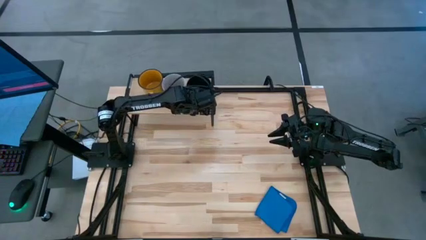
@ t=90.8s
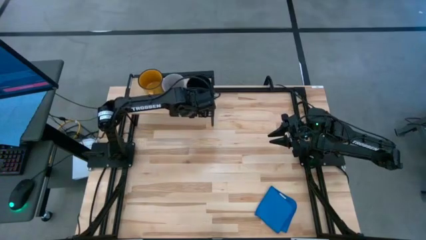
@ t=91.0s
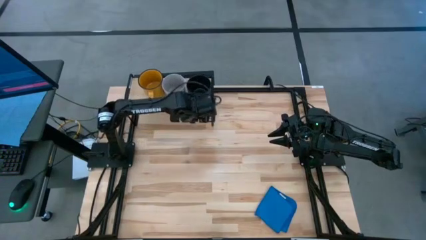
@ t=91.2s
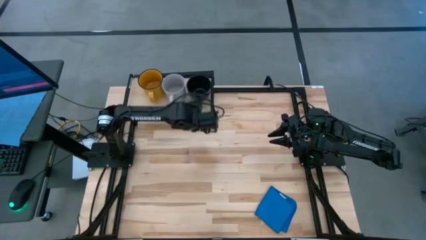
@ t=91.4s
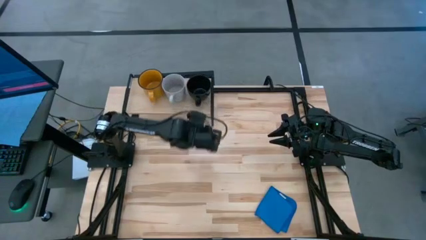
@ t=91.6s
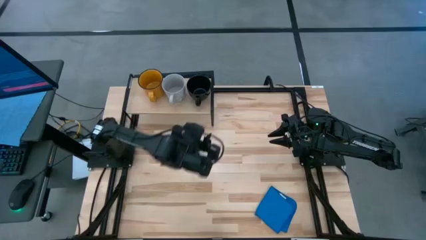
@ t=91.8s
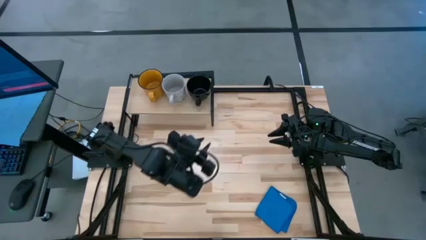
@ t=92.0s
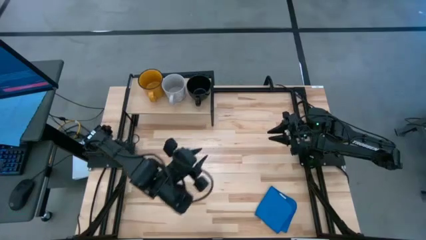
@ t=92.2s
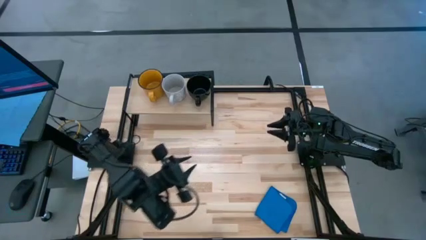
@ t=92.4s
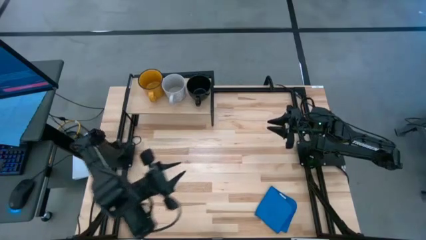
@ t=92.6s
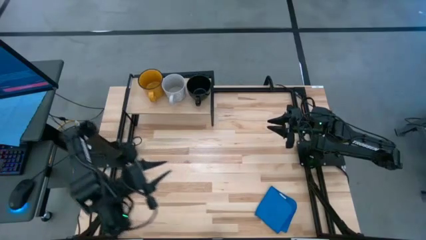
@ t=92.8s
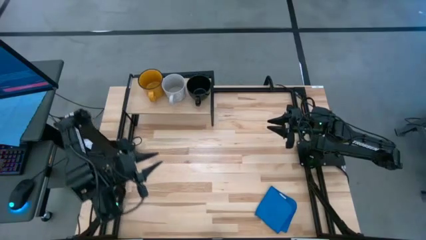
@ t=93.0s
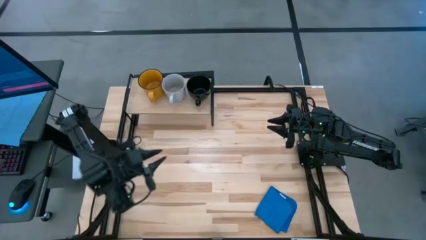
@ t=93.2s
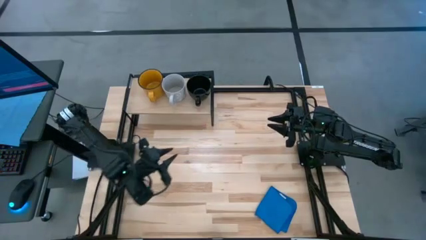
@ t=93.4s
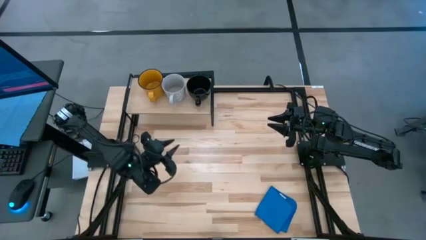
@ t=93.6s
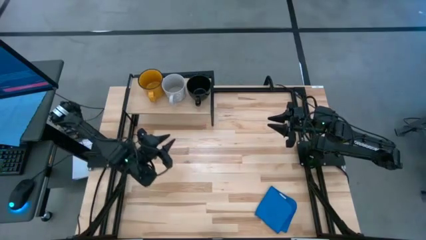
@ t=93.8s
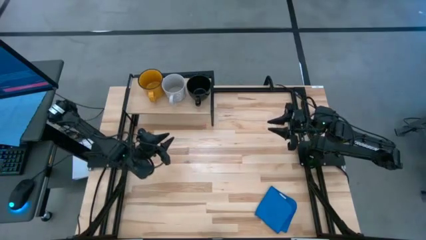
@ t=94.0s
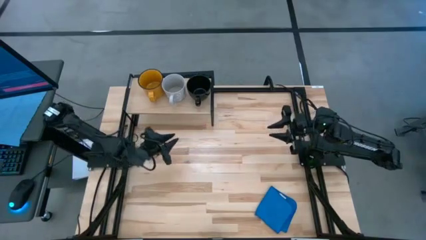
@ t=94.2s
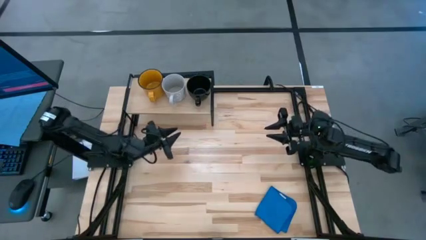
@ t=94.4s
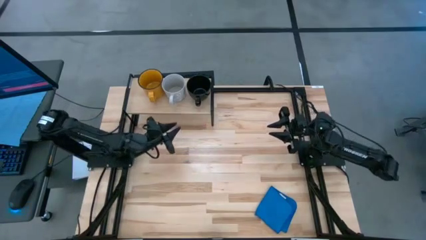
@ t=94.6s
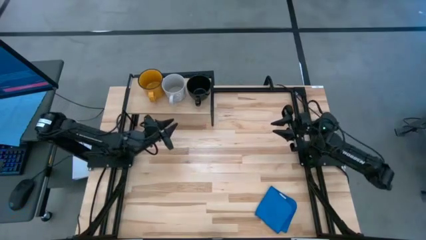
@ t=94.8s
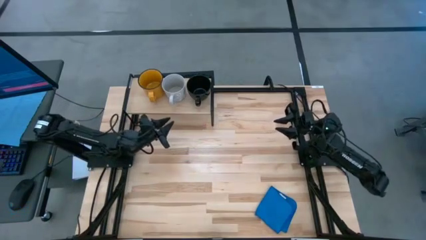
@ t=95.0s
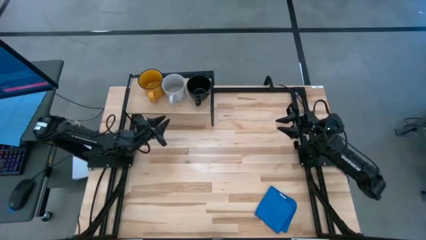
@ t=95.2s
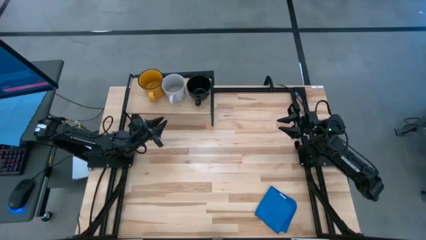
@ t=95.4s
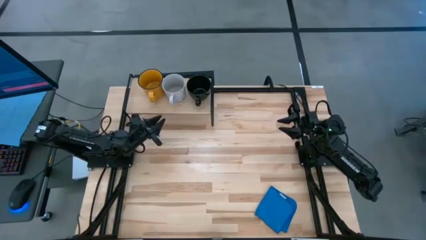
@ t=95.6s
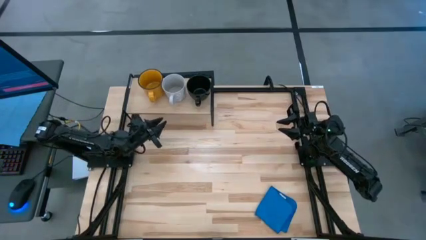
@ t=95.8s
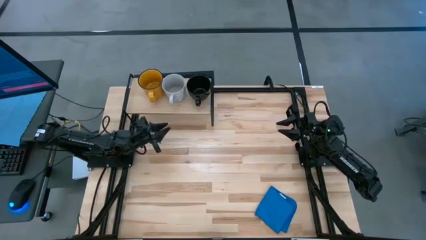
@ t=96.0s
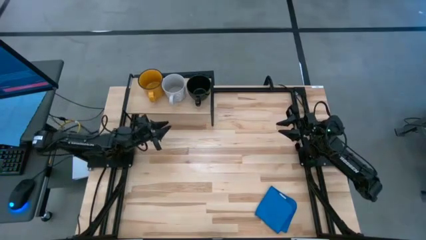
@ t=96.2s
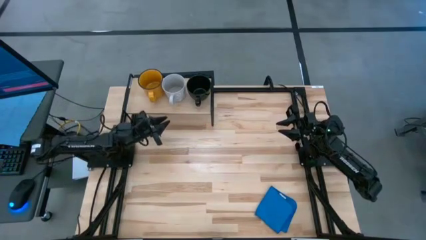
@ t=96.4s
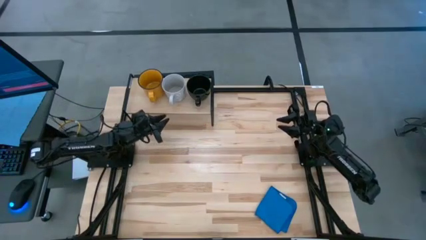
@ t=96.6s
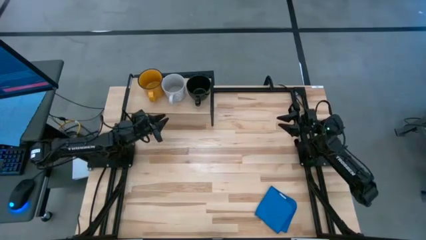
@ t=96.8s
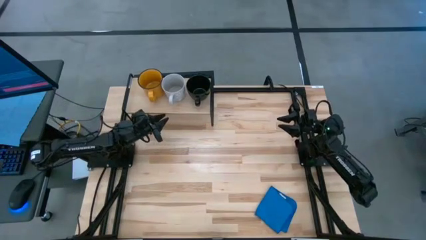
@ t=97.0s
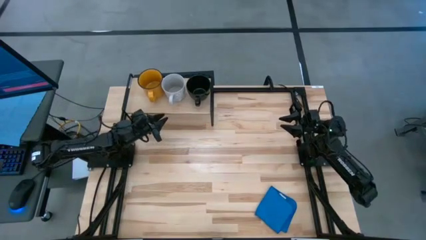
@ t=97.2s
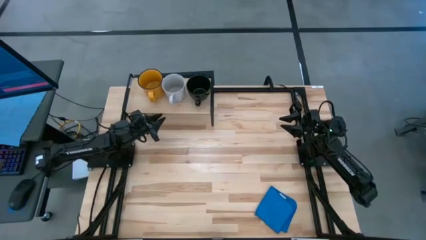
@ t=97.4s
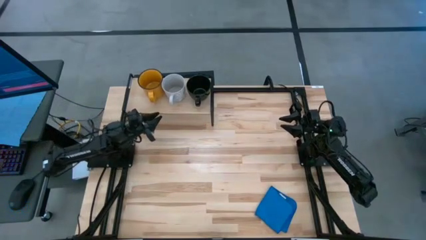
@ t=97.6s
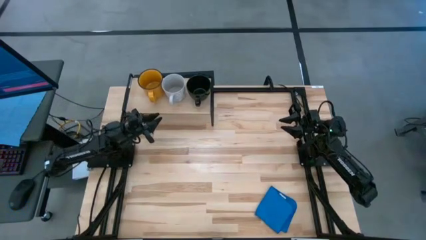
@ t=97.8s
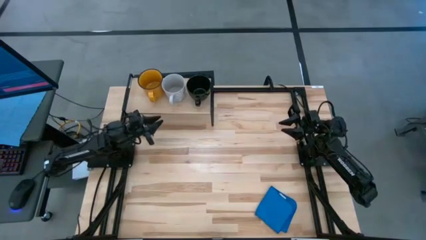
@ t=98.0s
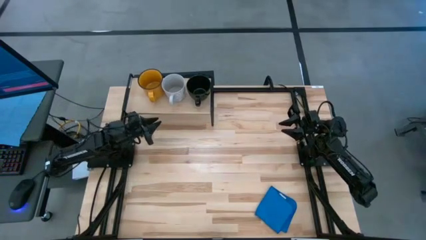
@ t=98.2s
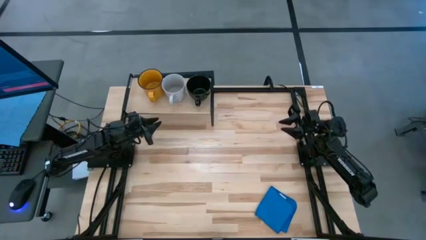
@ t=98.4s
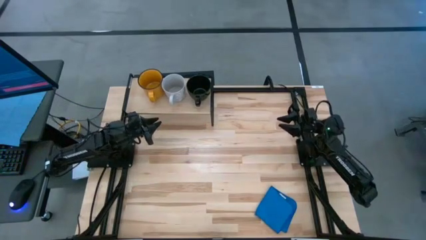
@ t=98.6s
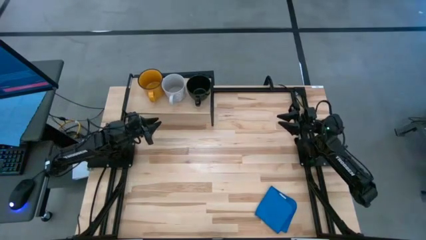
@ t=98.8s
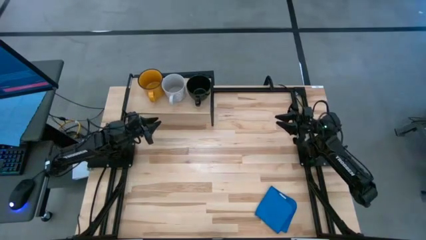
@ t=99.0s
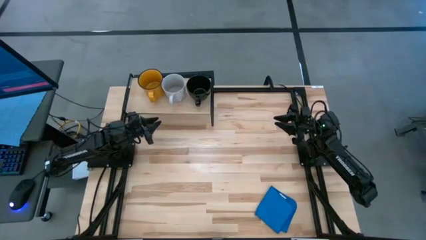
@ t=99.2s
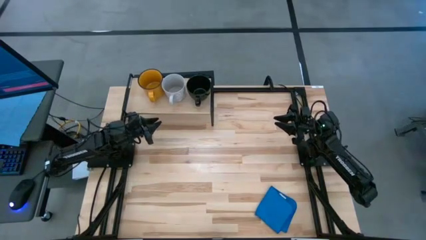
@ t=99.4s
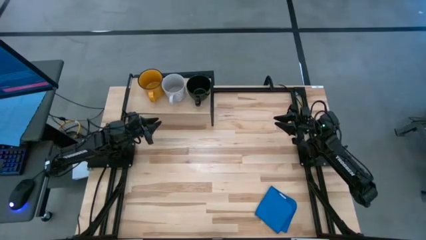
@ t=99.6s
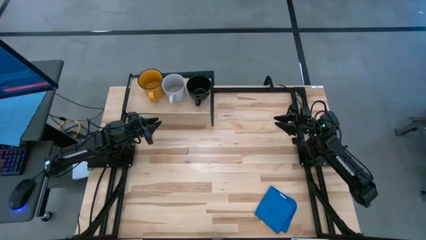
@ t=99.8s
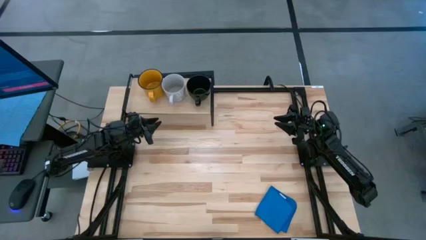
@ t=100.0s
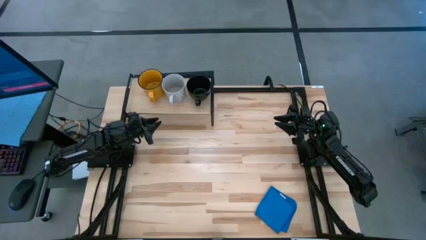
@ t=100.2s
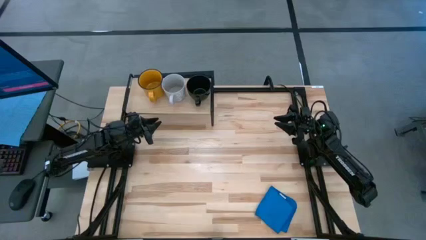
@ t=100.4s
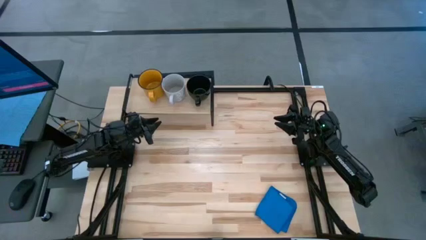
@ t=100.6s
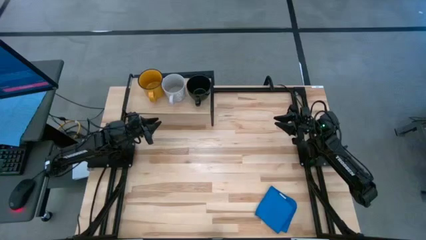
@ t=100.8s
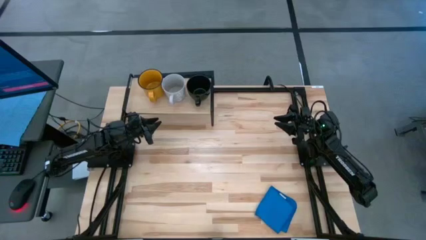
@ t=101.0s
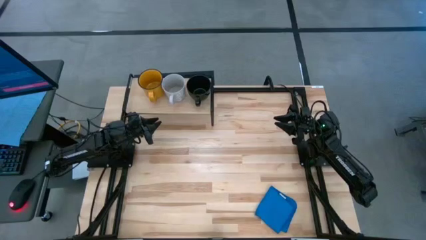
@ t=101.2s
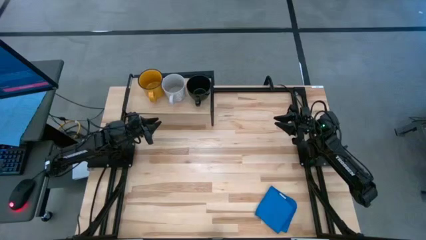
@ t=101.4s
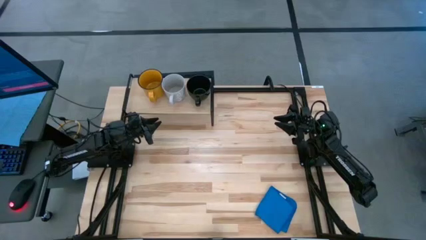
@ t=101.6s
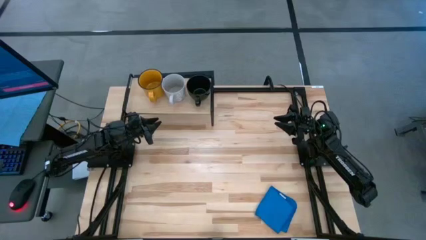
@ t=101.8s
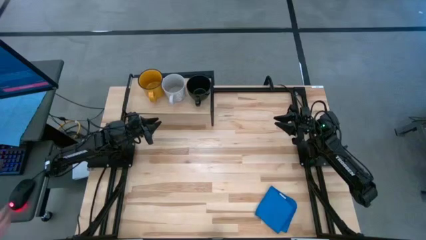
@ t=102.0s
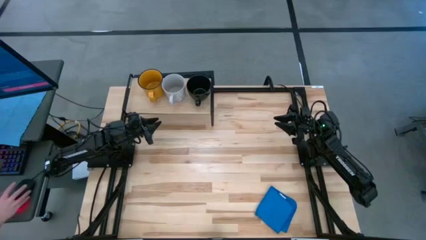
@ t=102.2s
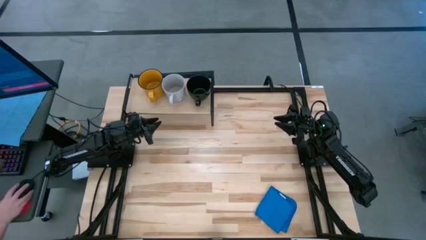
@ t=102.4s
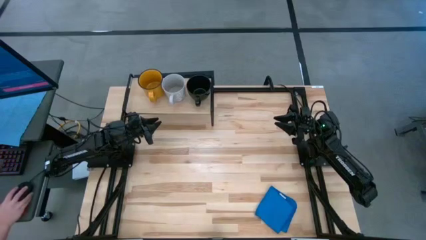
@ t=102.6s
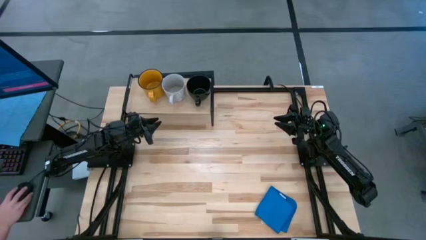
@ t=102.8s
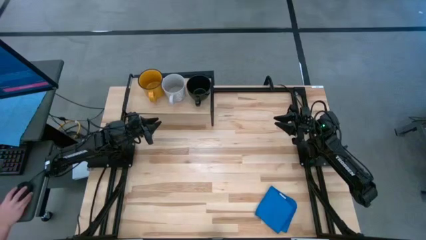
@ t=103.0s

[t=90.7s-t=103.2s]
Task: Stack small to large cups/mugs on shelf
Return to Home Position
